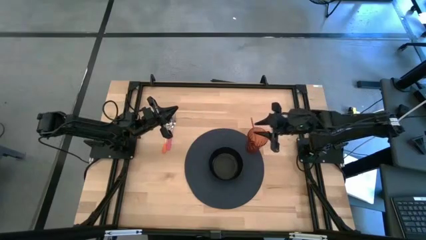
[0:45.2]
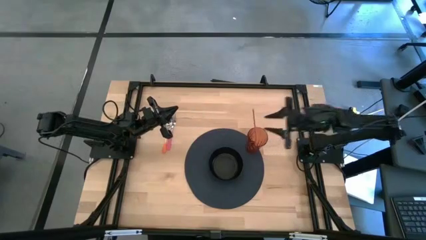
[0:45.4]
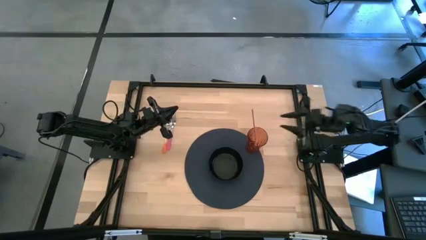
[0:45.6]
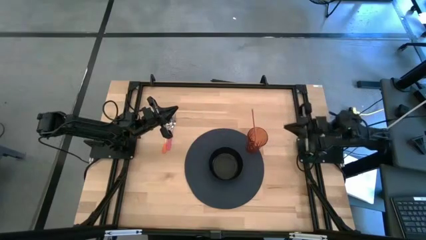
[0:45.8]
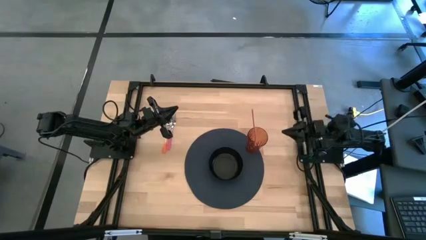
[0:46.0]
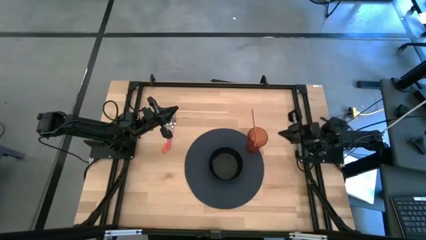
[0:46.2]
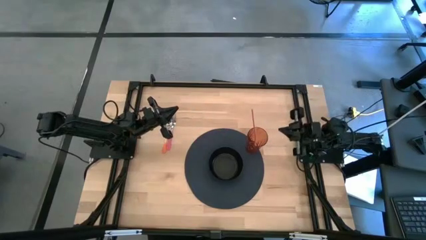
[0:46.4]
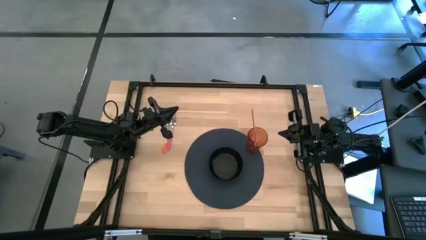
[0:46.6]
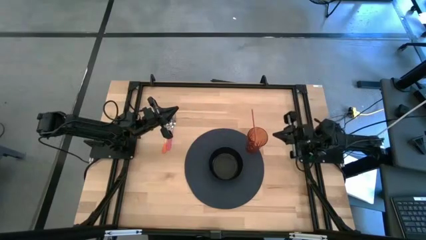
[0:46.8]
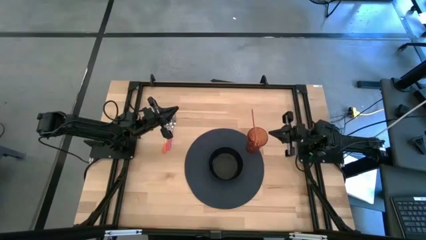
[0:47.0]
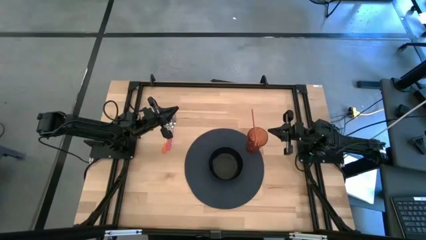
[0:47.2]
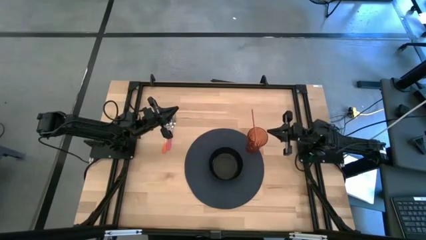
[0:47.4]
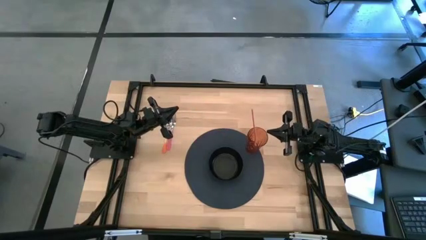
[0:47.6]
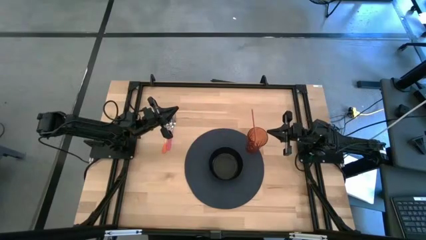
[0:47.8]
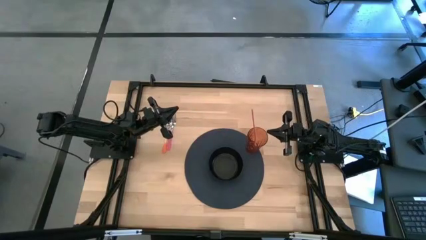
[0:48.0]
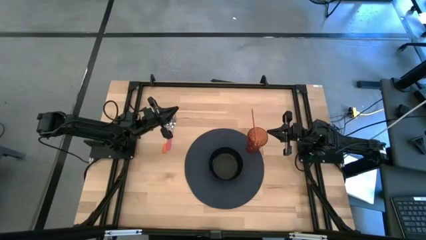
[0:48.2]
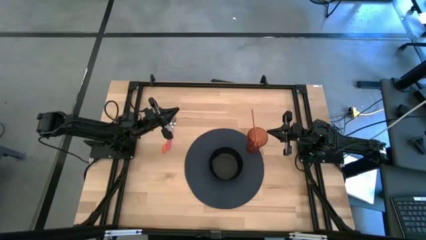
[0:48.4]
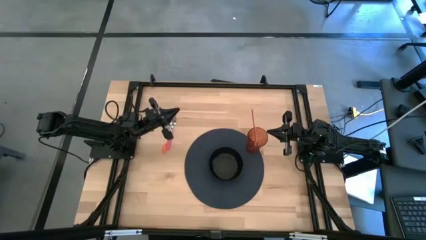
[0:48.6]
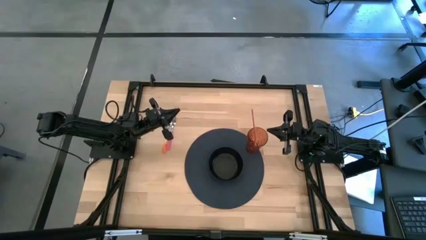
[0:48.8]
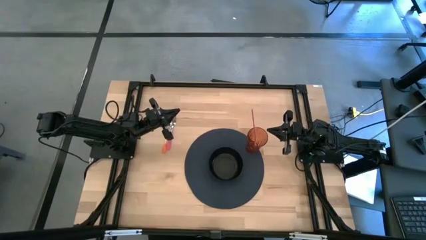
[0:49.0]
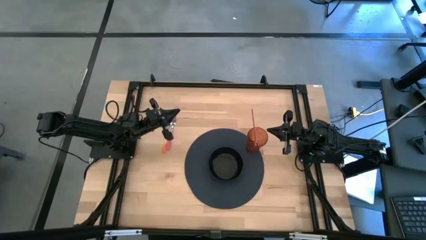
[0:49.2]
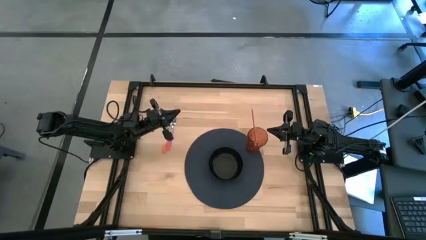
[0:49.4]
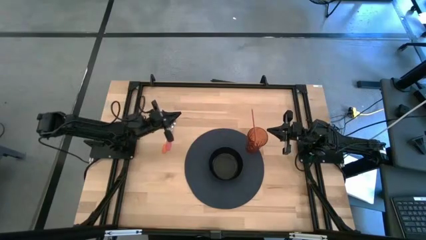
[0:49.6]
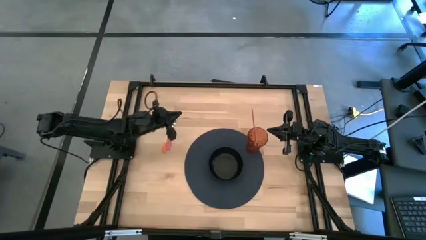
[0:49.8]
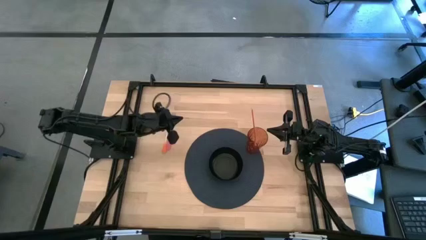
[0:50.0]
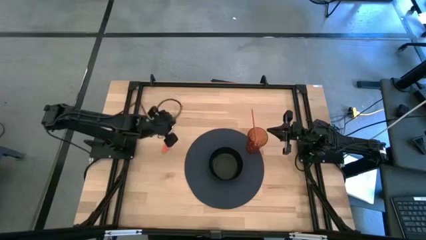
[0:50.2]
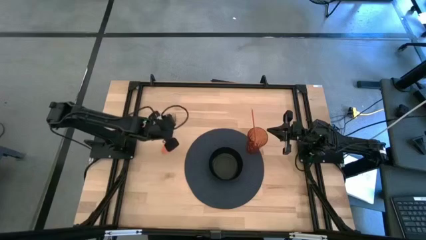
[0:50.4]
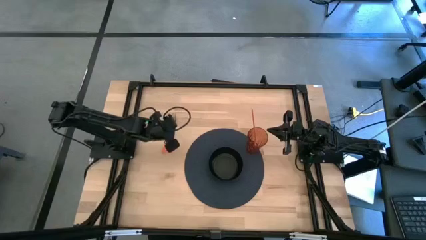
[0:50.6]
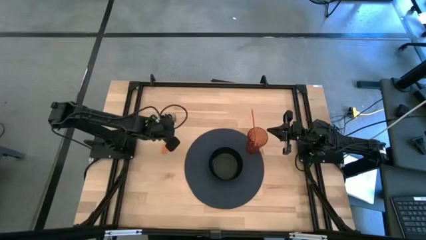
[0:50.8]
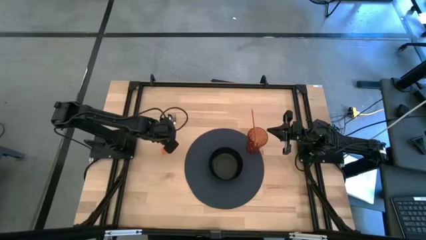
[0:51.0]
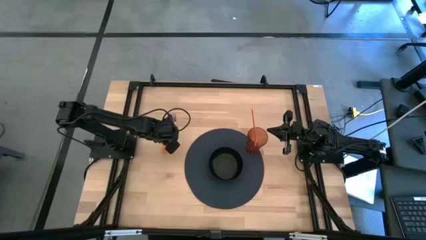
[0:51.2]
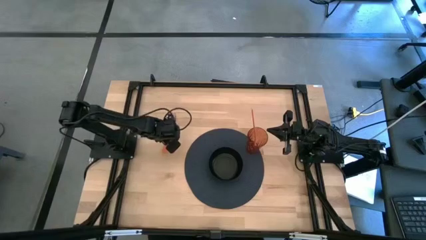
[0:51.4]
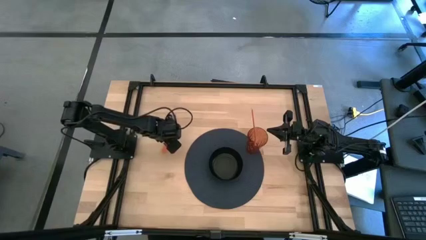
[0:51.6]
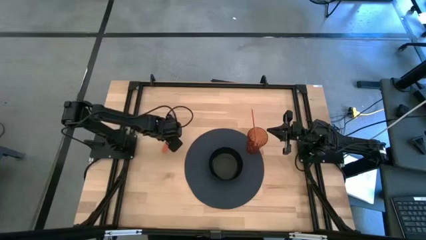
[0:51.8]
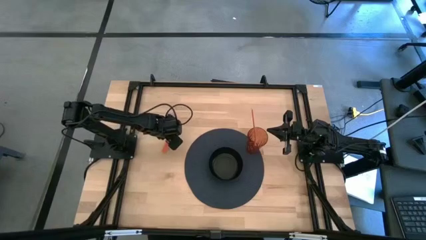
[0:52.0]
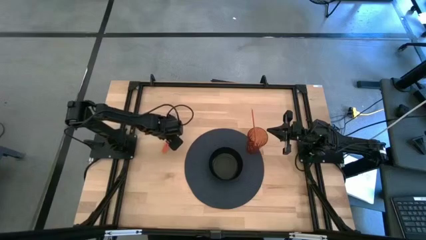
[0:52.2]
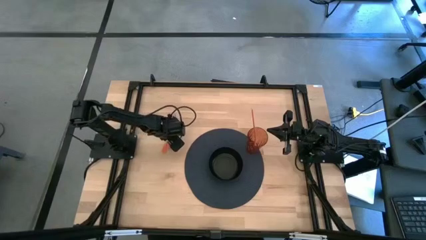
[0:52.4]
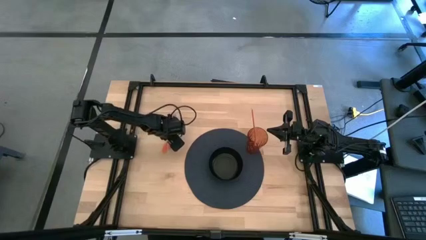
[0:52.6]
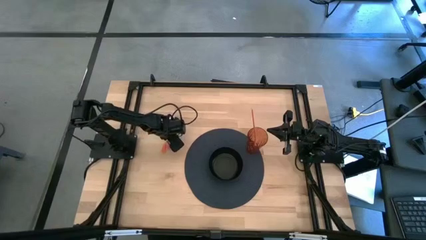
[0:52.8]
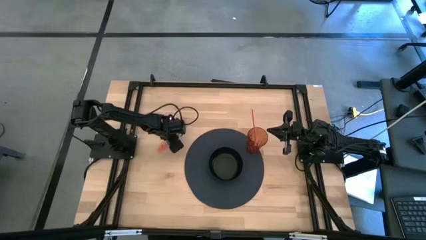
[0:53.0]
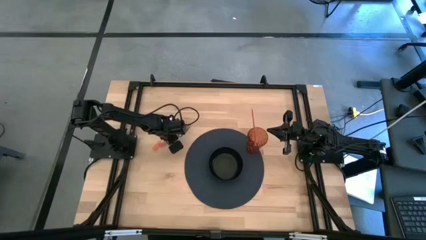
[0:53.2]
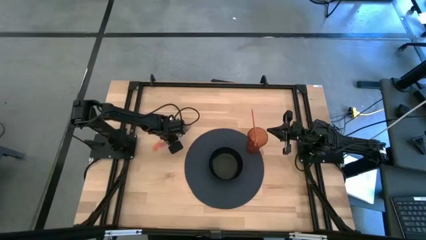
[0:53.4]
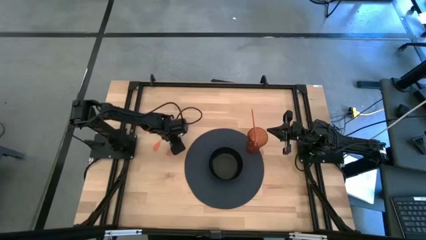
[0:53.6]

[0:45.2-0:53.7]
Task: Pick & Place Utensil
Put the pink fork into the black bowl on the blue mat

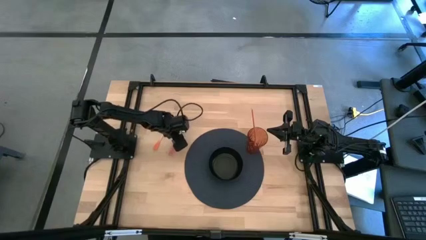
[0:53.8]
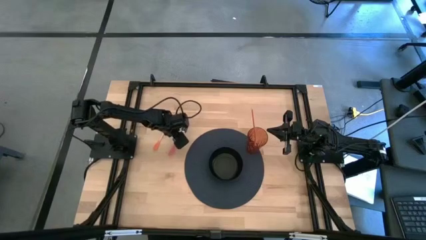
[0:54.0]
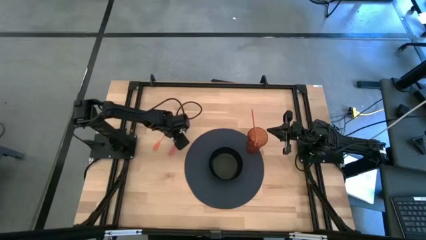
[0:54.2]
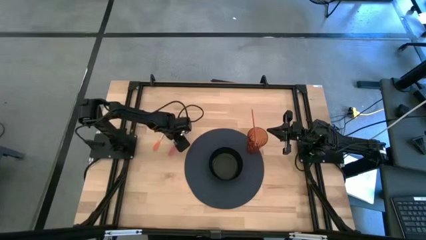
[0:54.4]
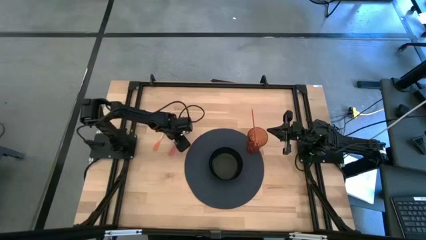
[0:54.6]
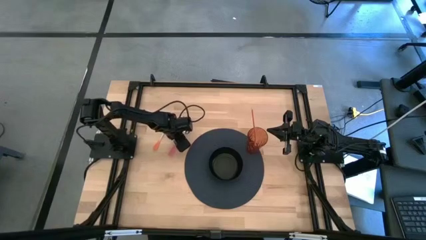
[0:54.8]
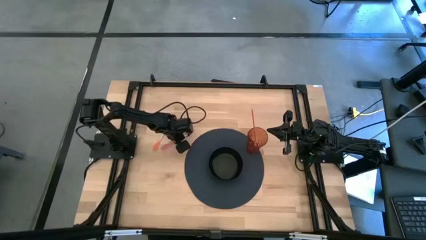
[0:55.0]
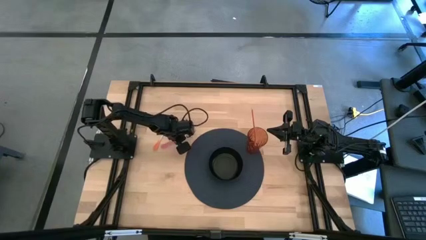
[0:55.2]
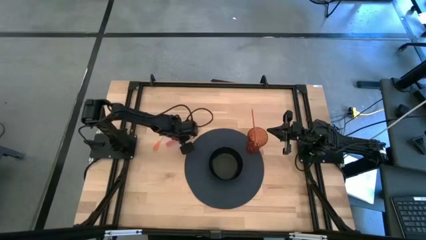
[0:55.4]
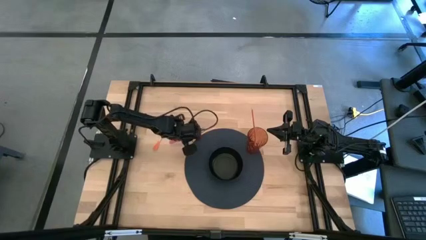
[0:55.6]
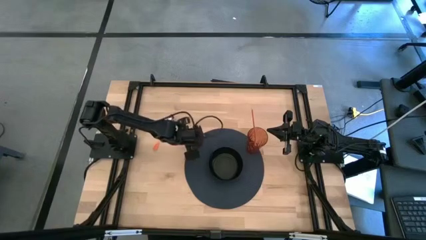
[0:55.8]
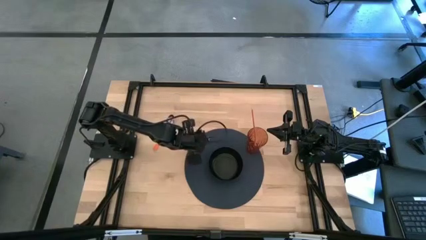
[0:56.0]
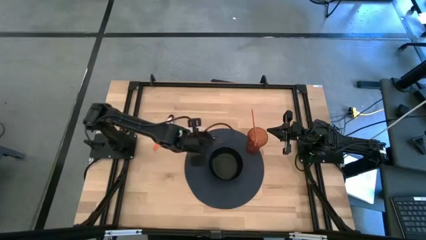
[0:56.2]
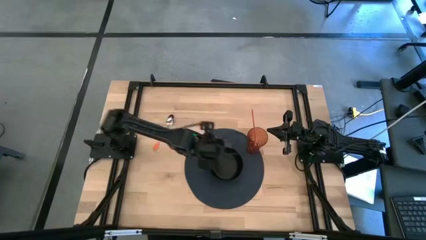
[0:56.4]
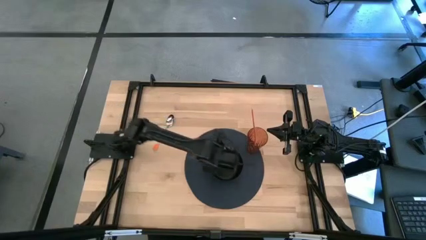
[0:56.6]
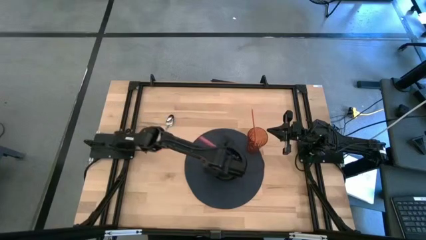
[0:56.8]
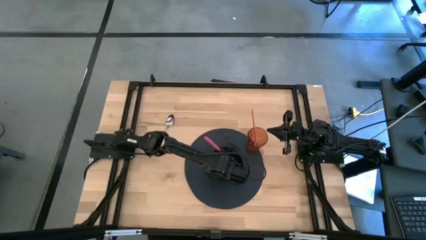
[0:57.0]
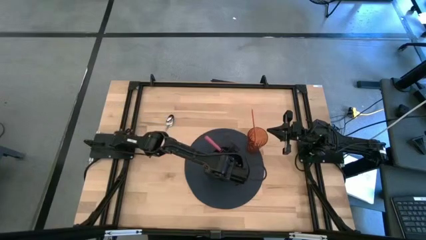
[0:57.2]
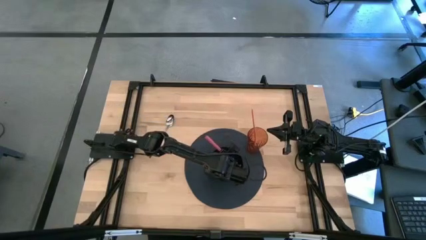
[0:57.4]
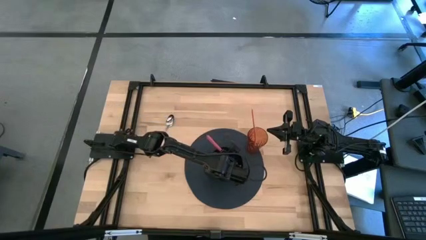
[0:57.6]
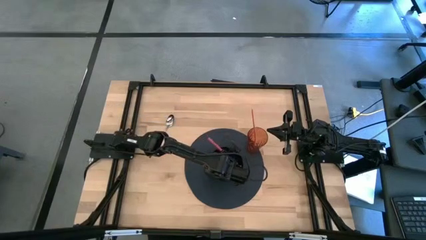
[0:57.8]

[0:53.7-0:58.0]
Put the pink fork into the black bowl on the blue mat
